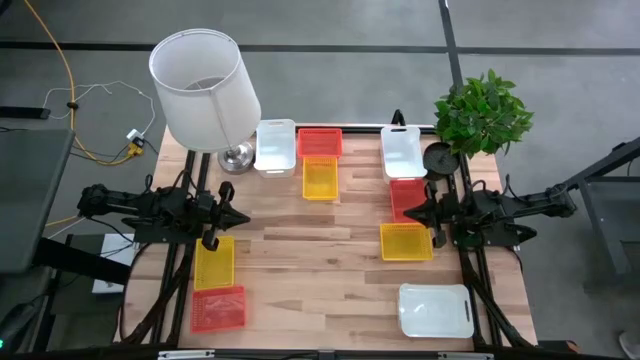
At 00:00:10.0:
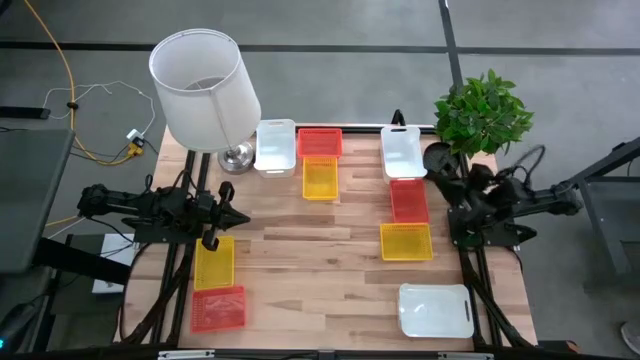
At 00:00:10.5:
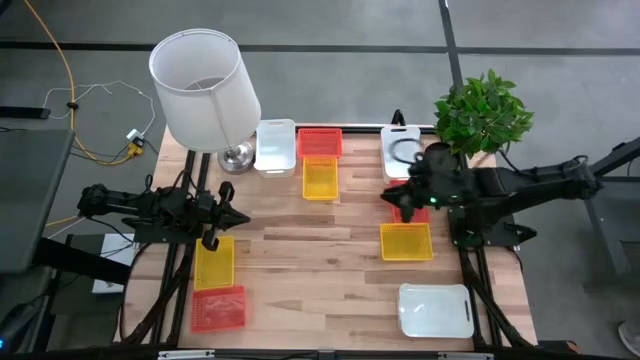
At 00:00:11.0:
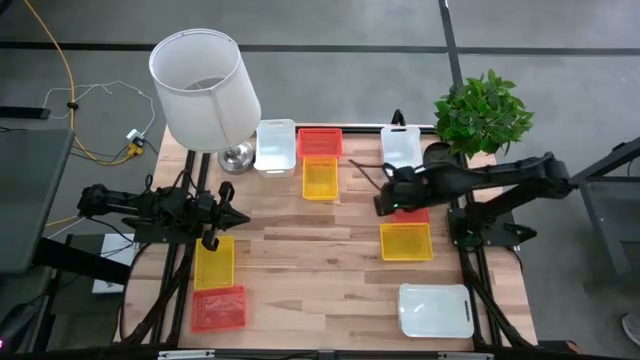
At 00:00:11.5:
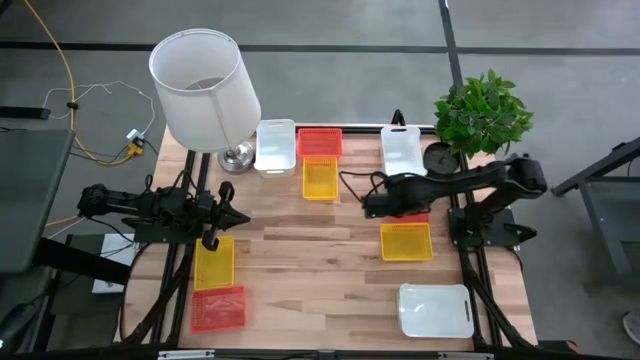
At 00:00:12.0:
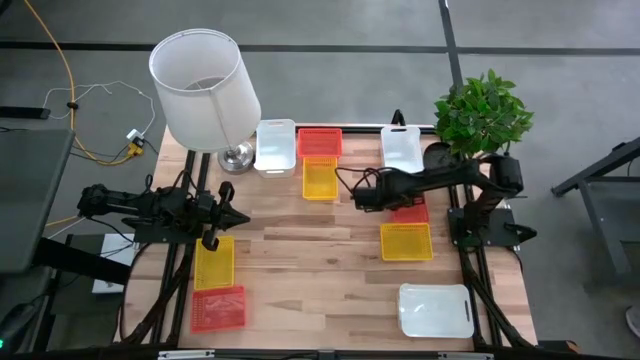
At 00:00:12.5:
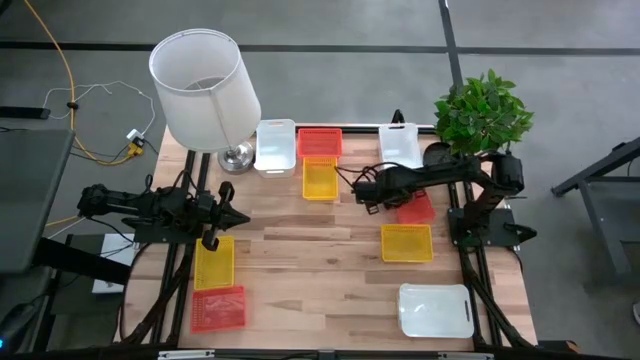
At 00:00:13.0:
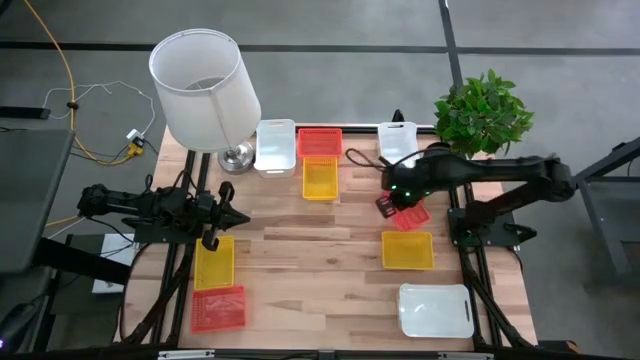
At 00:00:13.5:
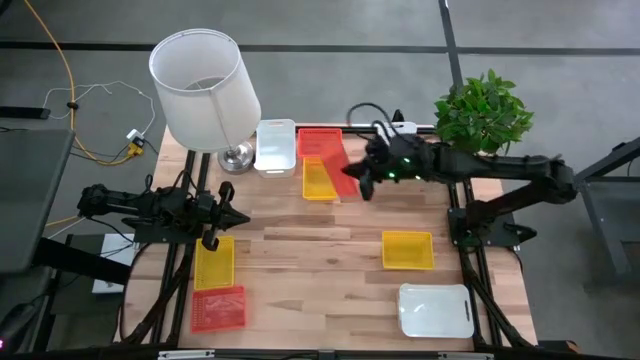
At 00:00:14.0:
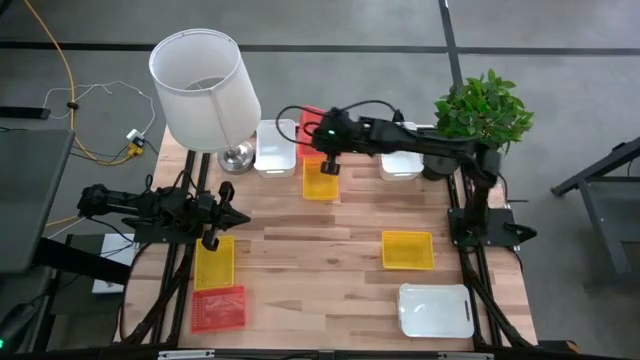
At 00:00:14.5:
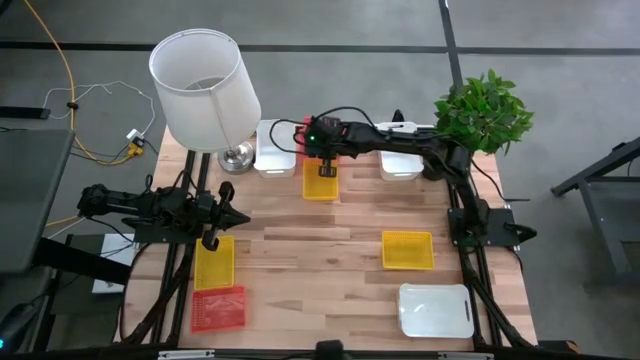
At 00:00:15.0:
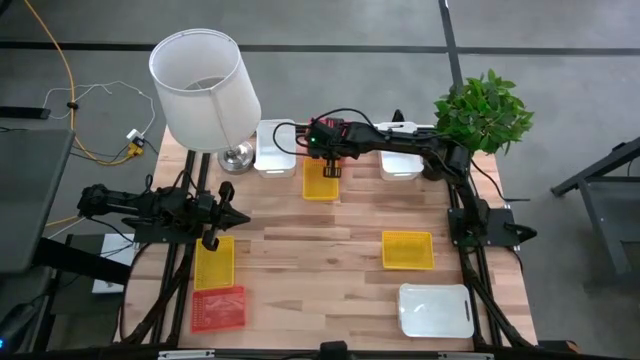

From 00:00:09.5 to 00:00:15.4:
Stack the middle right orange bin on the top orange bin

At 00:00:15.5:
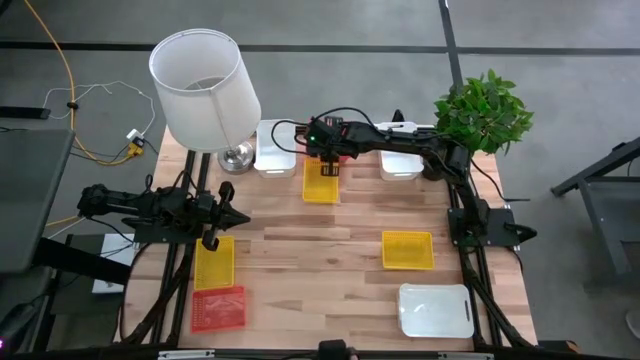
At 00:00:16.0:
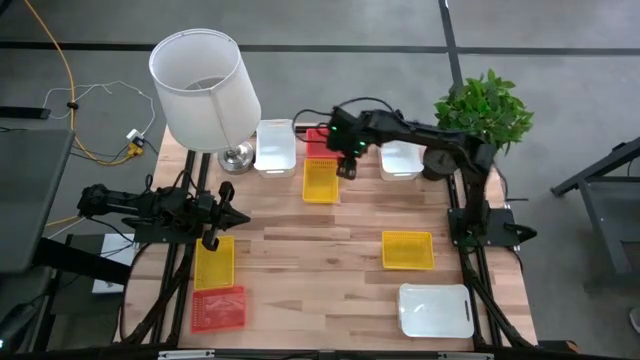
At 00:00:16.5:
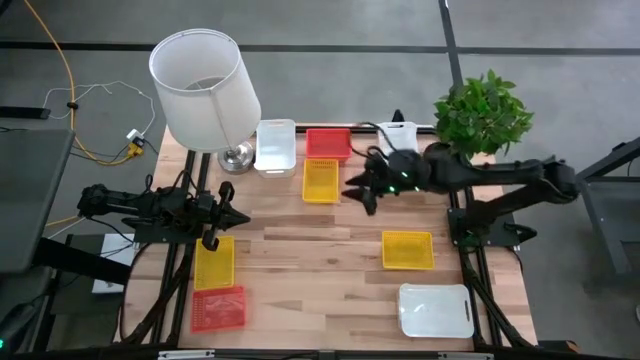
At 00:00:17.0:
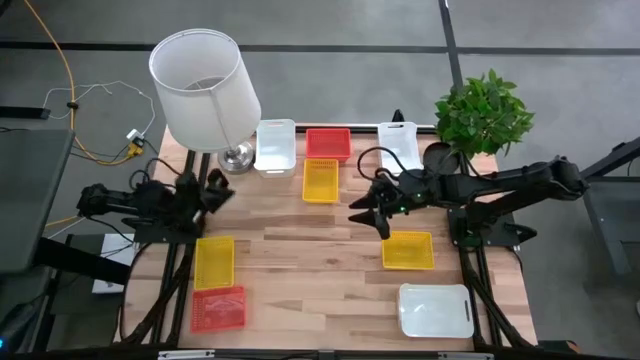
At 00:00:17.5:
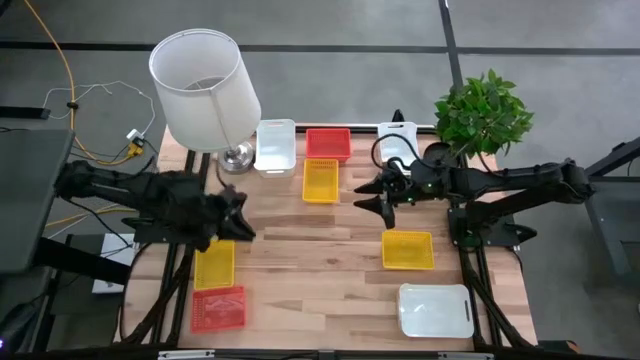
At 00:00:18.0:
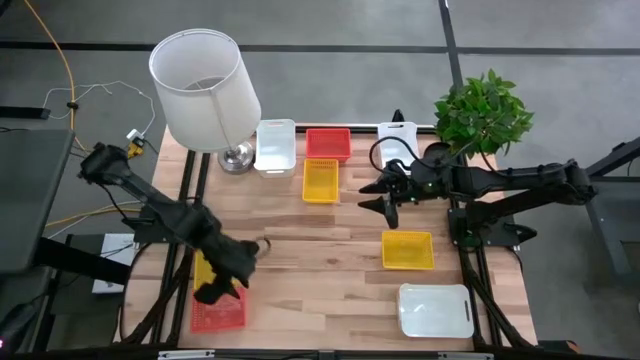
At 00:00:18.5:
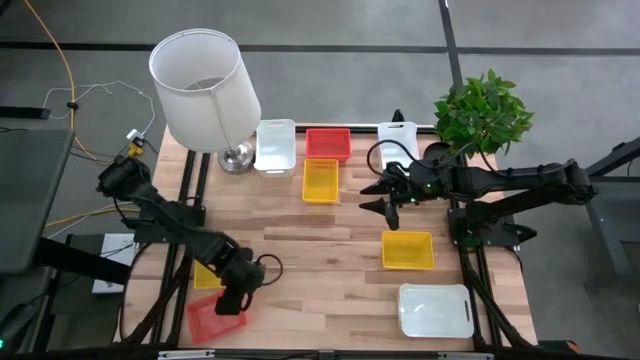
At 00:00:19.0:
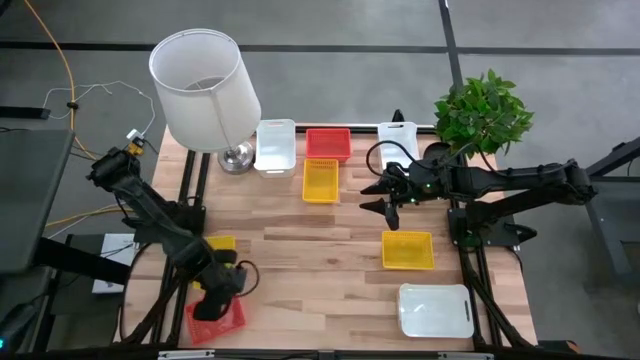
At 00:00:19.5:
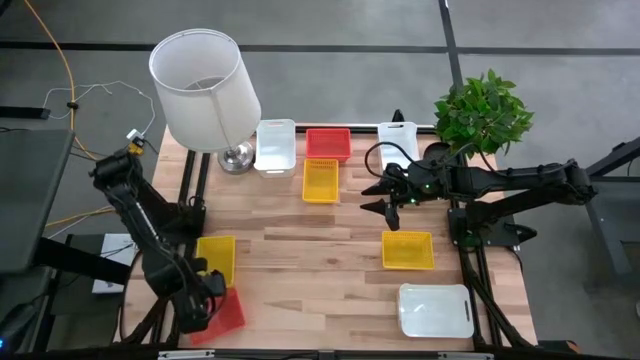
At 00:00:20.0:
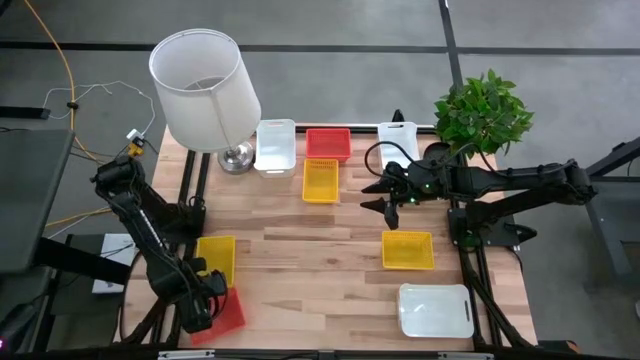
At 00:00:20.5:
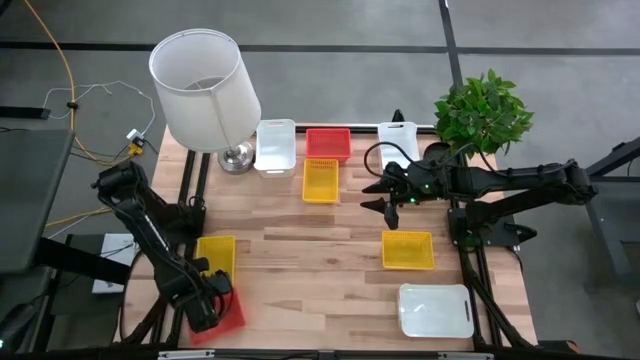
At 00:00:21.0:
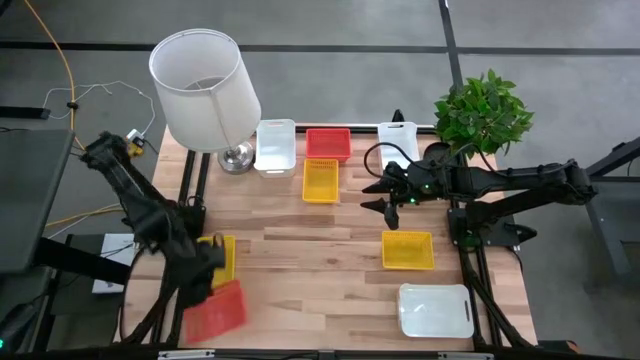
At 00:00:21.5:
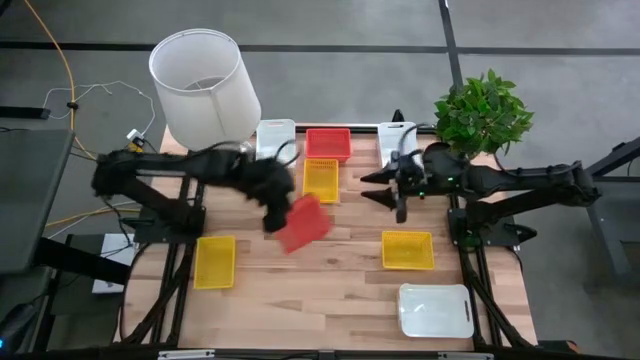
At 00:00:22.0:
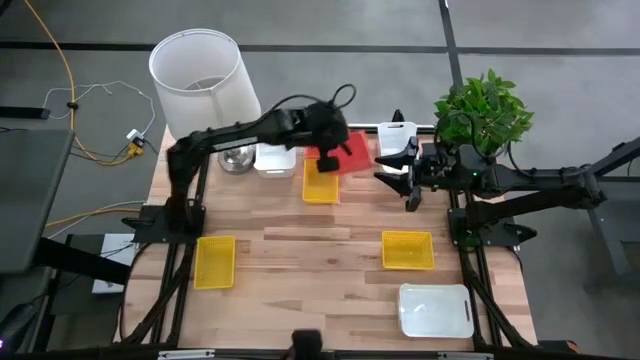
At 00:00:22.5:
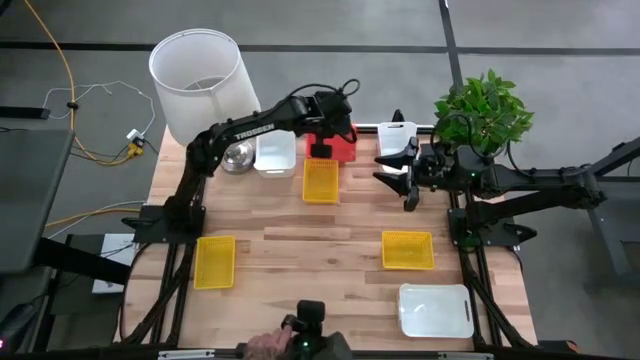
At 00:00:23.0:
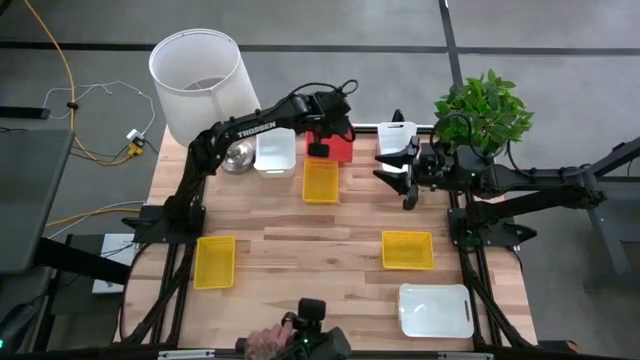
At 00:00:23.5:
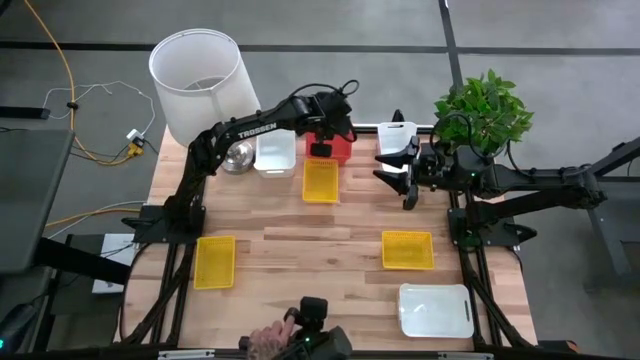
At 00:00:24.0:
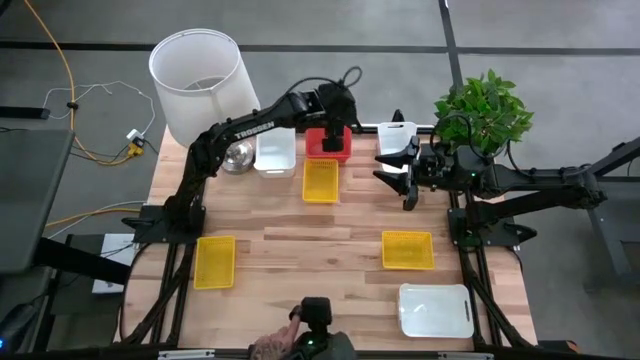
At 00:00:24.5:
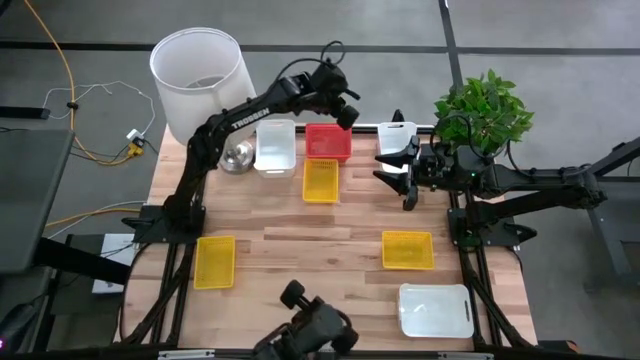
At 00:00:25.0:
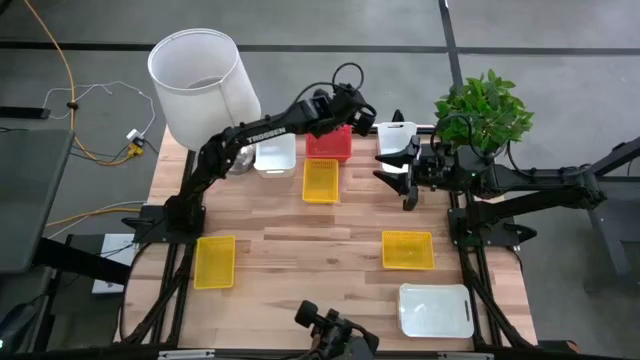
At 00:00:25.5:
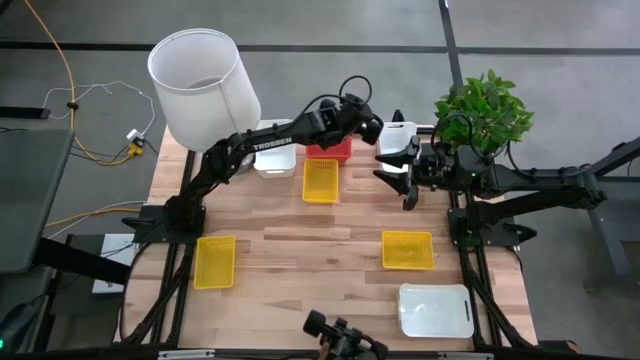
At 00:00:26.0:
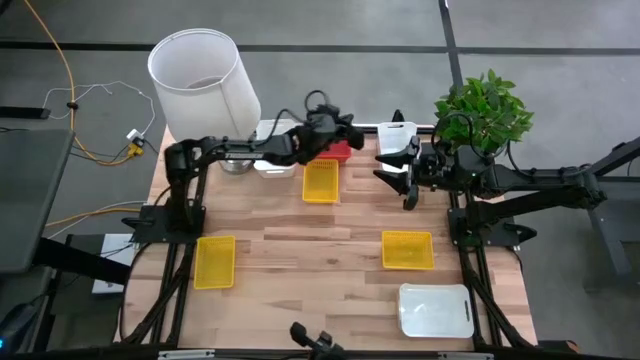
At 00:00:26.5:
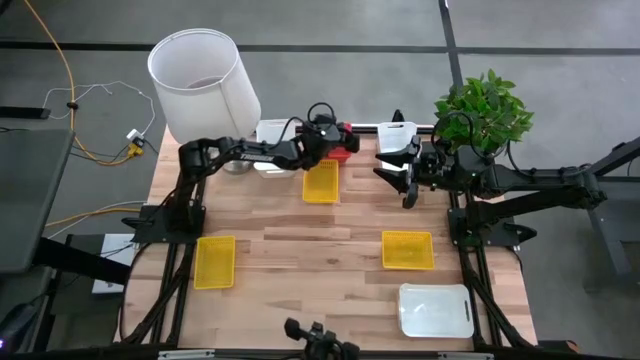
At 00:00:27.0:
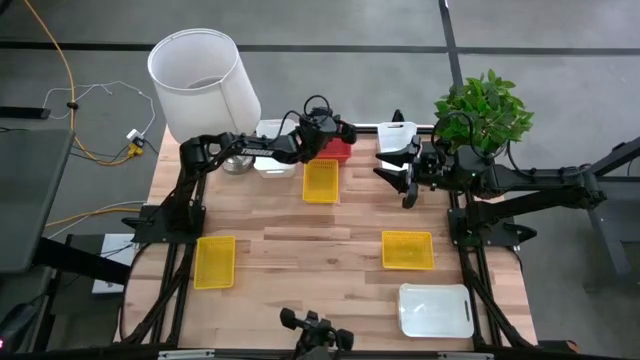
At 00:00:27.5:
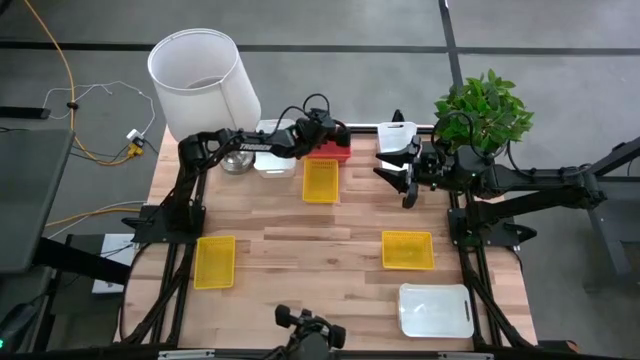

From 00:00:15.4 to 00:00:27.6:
Stack the bottom orange bin on the orange bin
